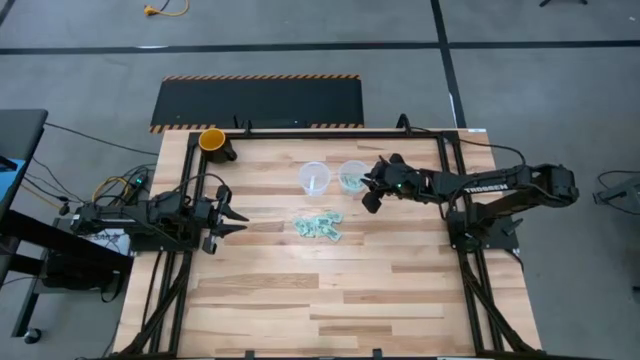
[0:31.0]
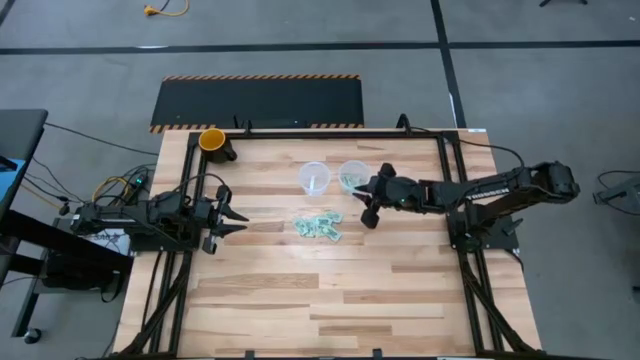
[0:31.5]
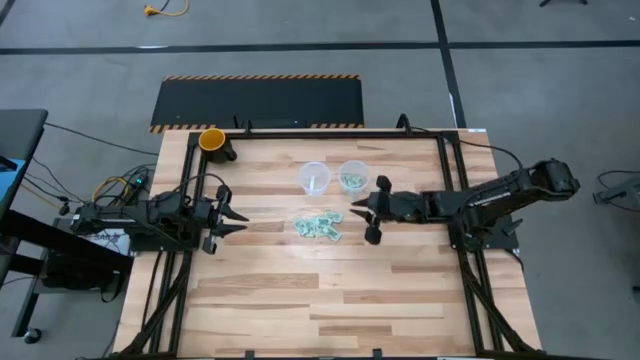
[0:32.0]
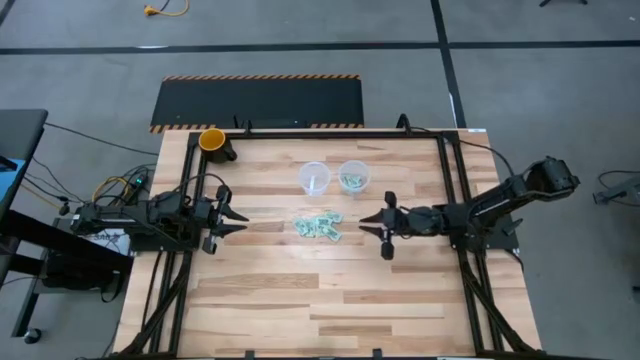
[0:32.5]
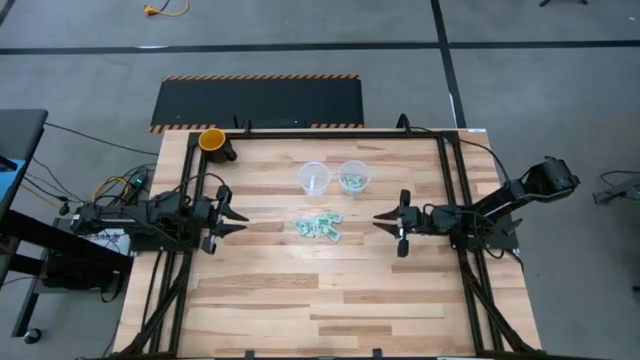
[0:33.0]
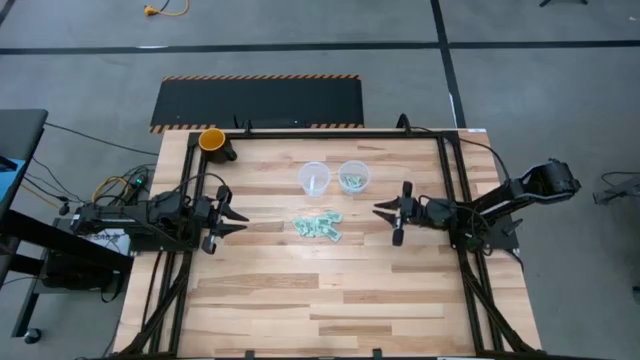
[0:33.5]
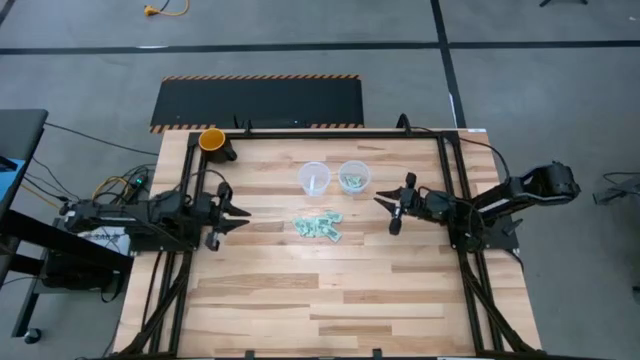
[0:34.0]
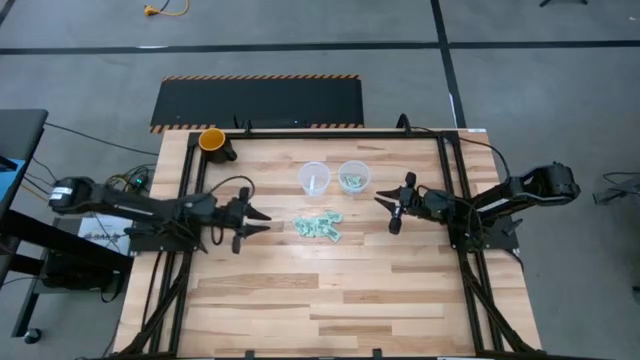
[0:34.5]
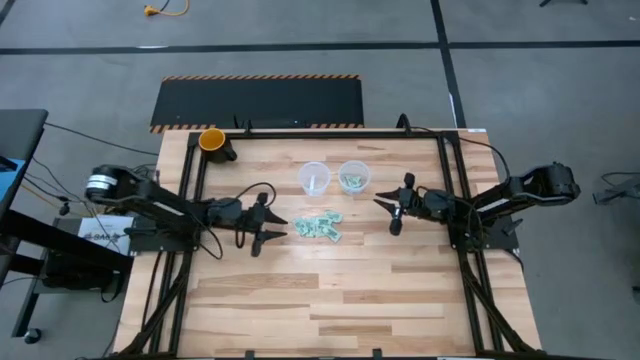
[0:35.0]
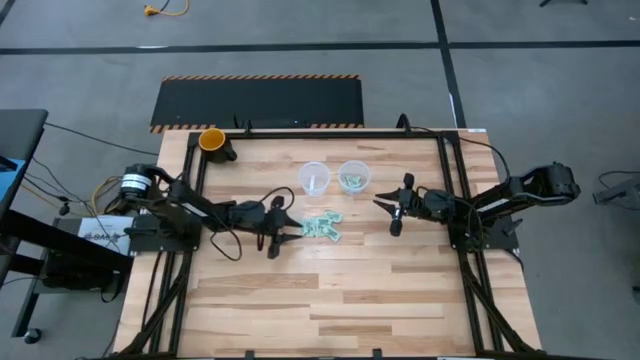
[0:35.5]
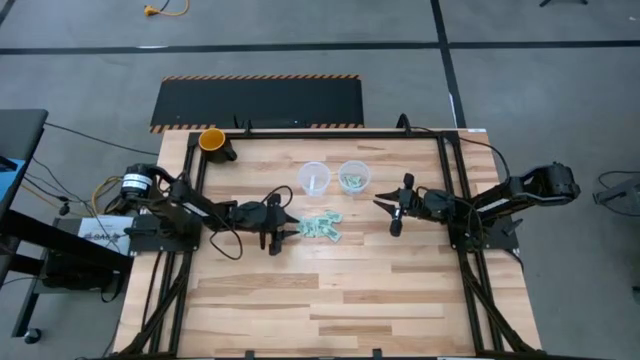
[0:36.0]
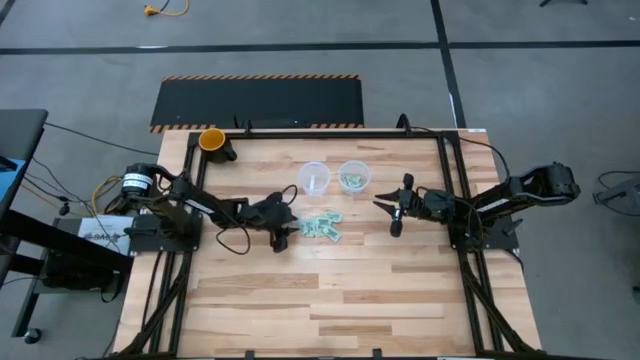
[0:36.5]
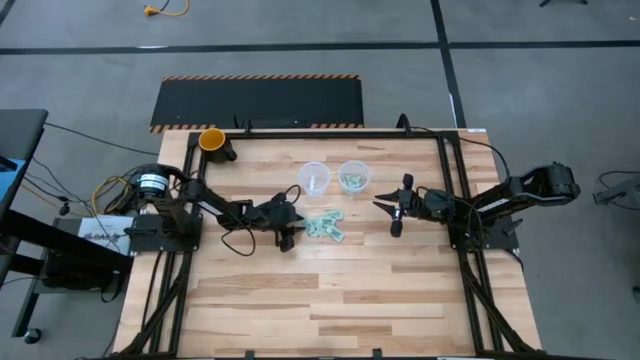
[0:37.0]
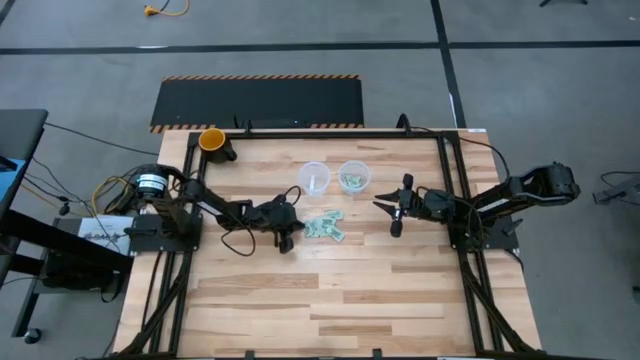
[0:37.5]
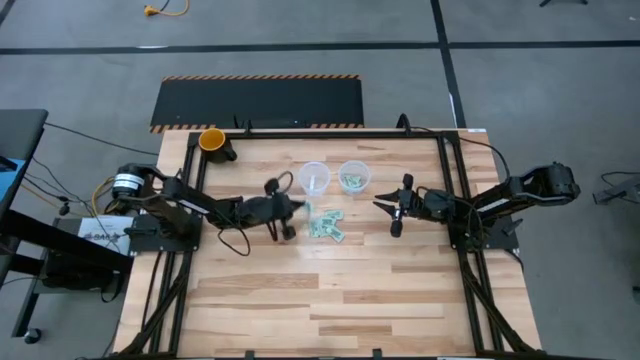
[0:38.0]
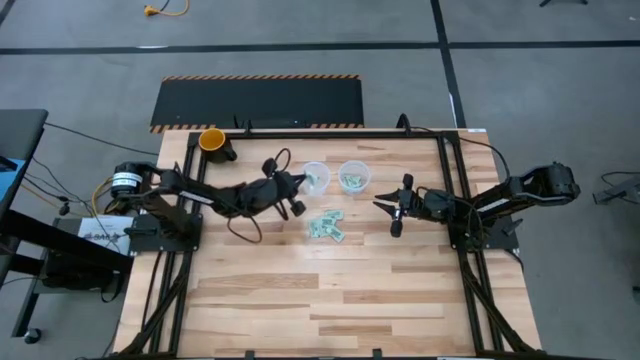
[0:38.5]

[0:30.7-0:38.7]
Task: Pick and place items into bin
Put the green stevia packet into the left transparent bin

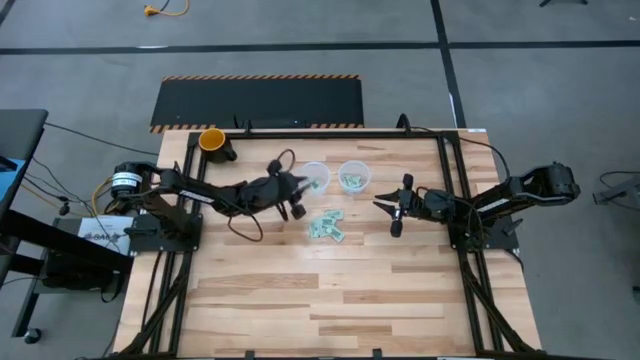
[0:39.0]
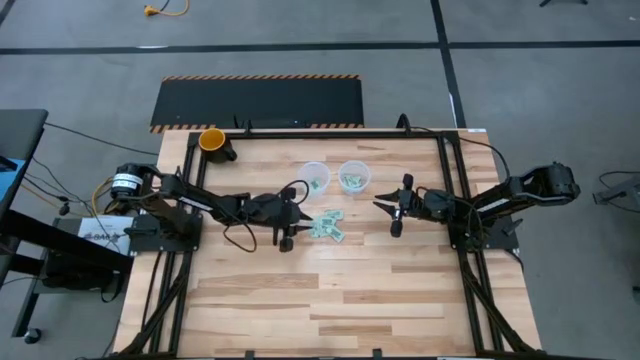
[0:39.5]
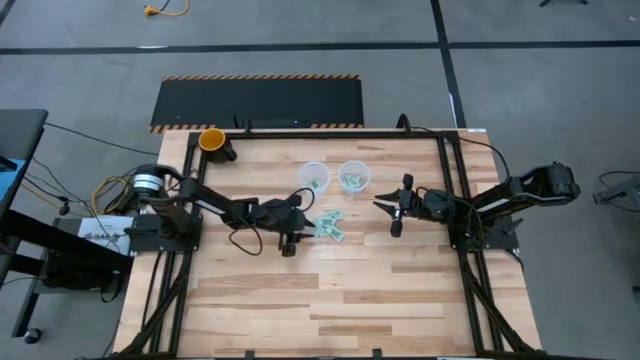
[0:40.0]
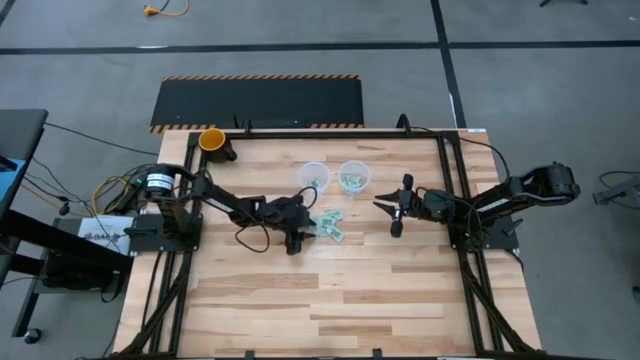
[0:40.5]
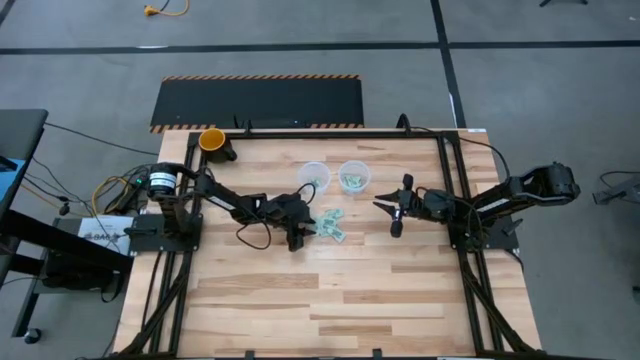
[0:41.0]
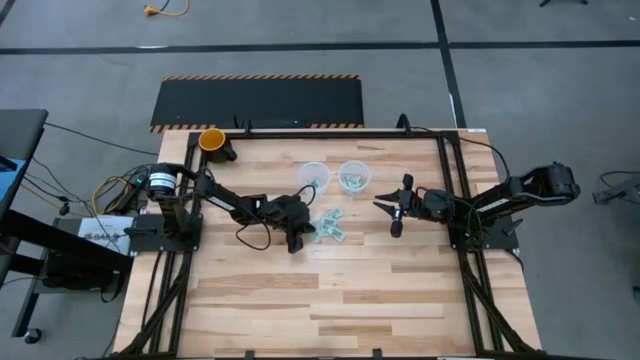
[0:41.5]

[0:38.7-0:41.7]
Put the green stevia packet into the left transparent bin

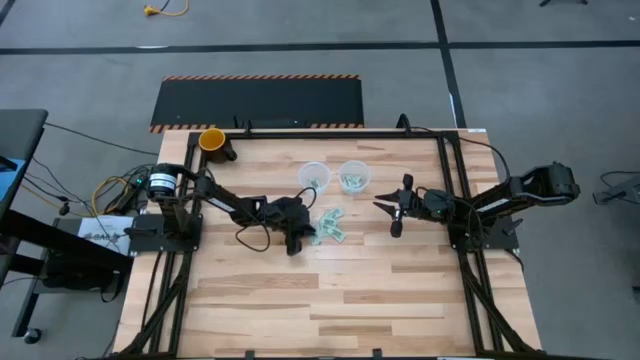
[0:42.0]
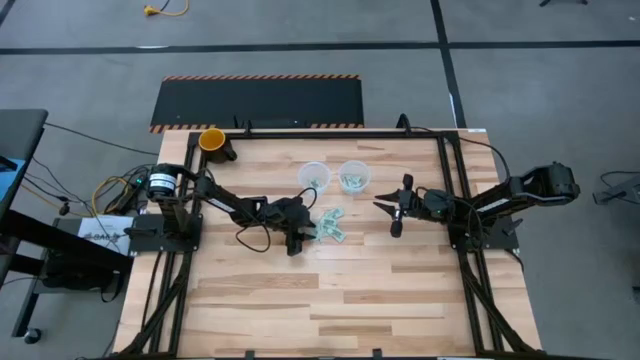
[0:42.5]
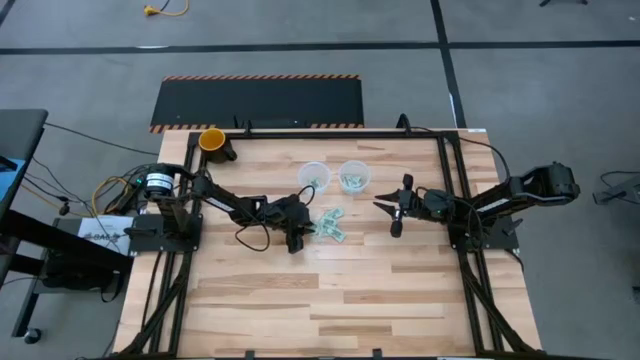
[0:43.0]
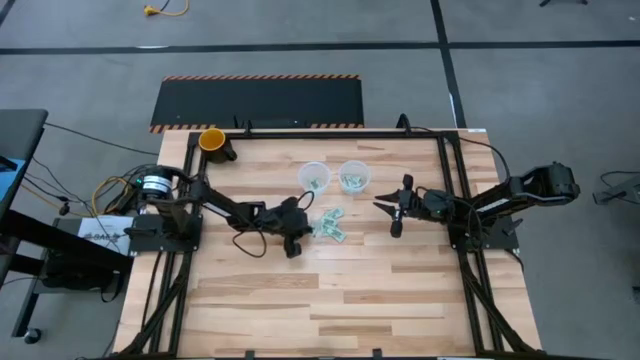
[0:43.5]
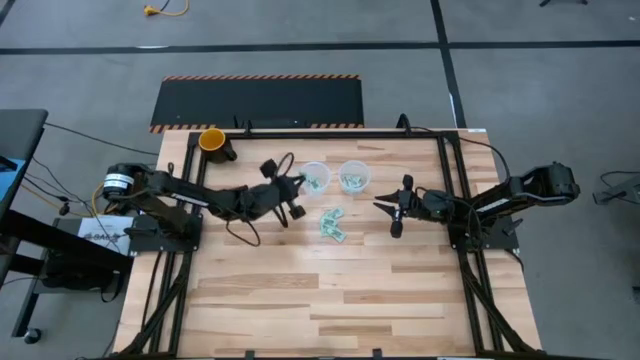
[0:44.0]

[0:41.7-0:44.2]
Put the green stevia packet into the left transparent bin

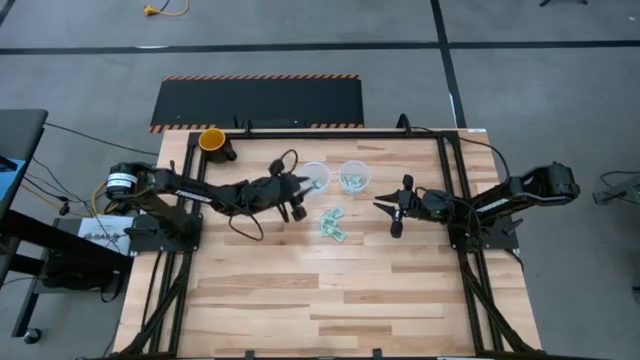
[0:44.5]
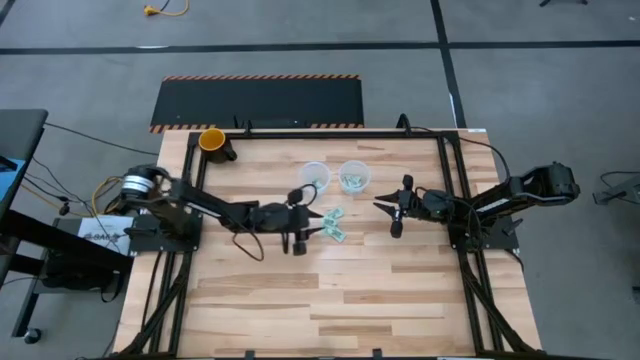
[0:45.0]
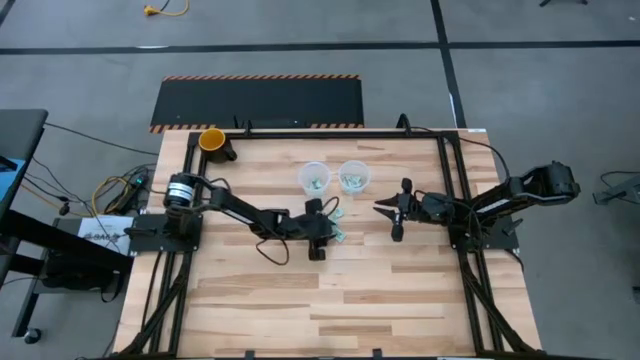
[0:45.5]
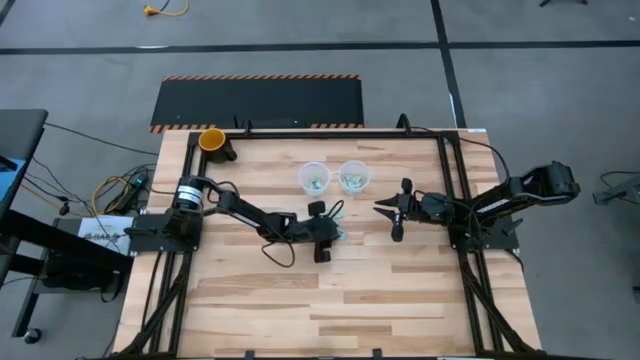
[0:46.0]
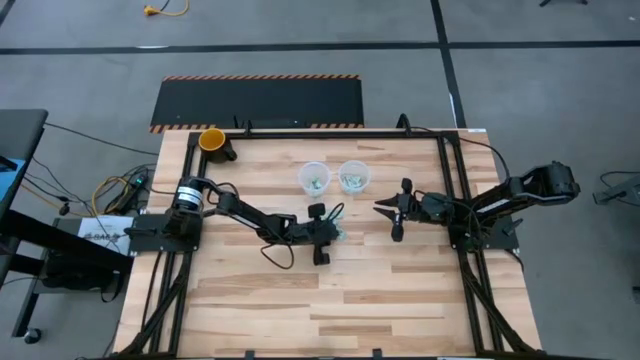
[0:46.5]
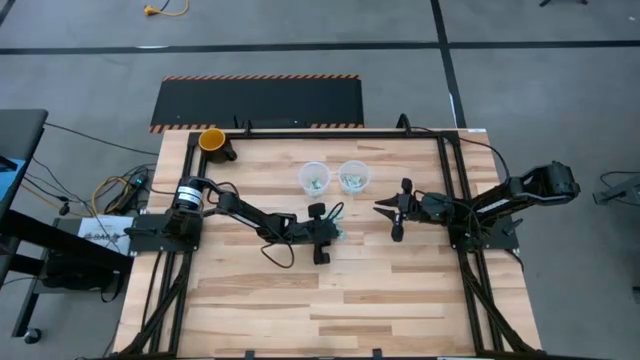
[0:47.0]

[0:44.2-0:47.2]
Put the green stevia packet into the left transparent bin

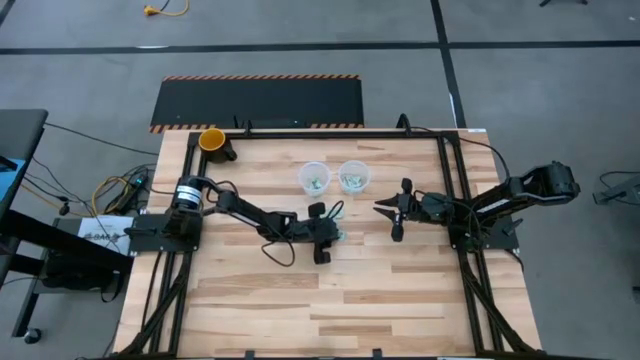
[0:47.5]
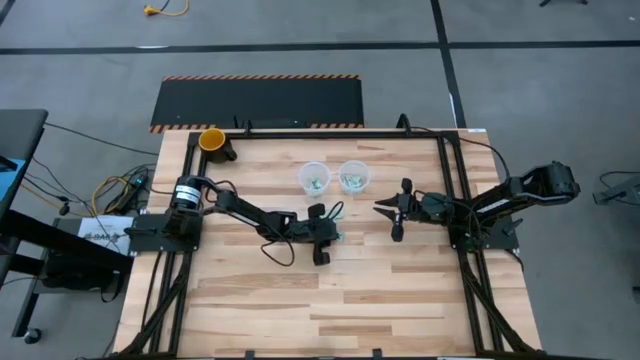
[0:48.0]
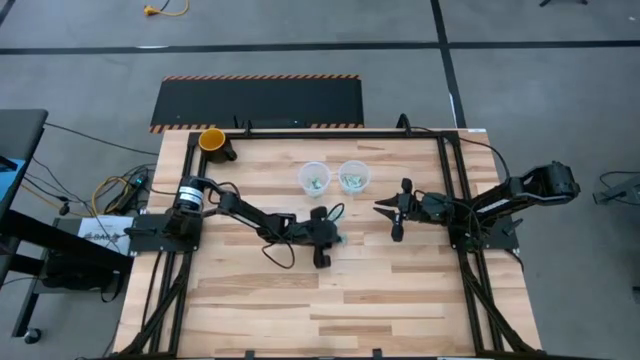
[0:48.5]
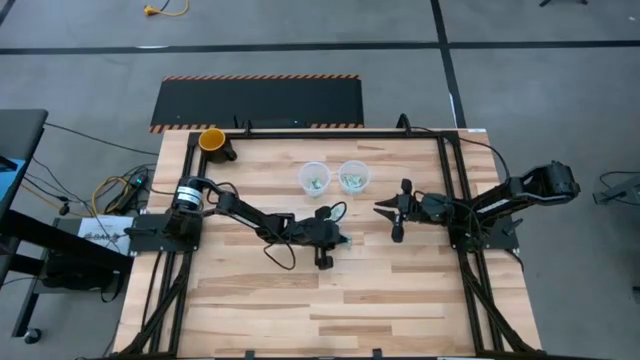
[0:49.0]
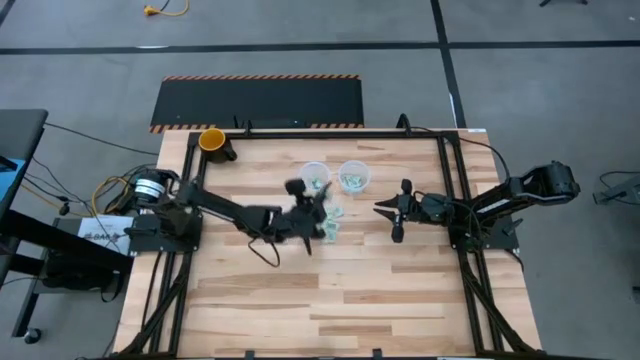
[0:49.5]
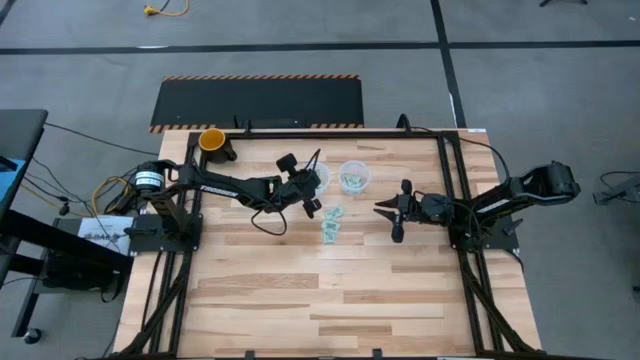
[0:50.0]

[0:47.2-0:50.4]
Put the green stevia packet into the left transparent bin

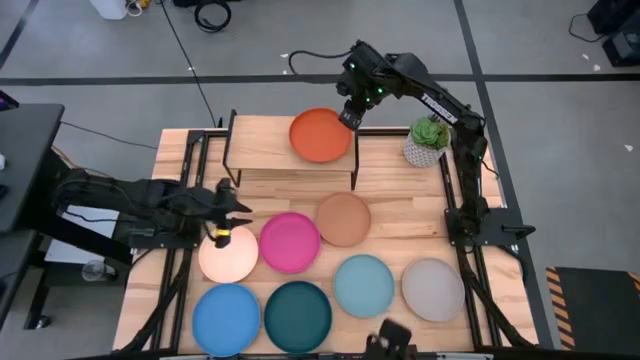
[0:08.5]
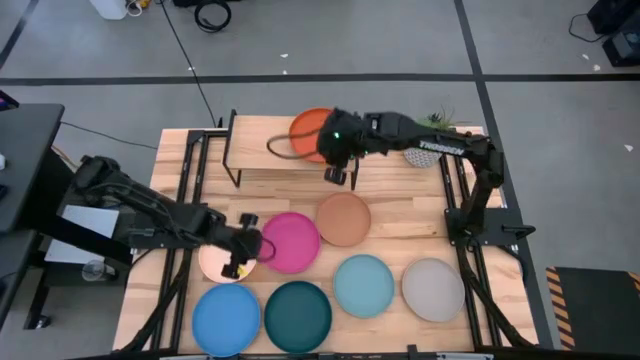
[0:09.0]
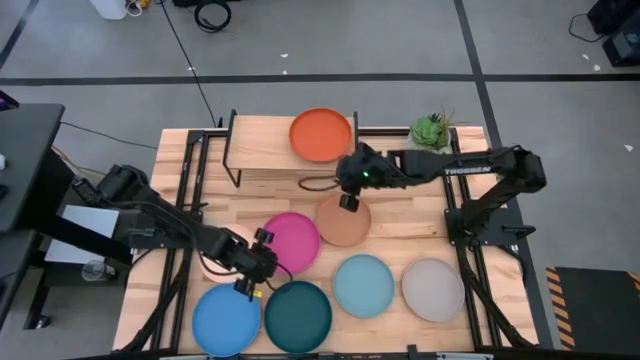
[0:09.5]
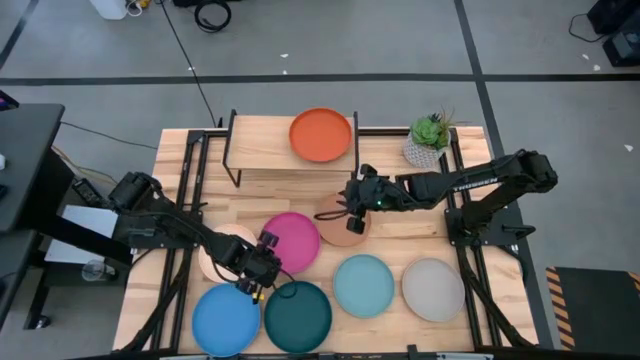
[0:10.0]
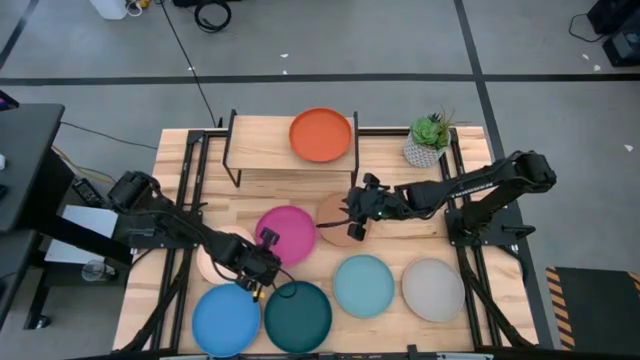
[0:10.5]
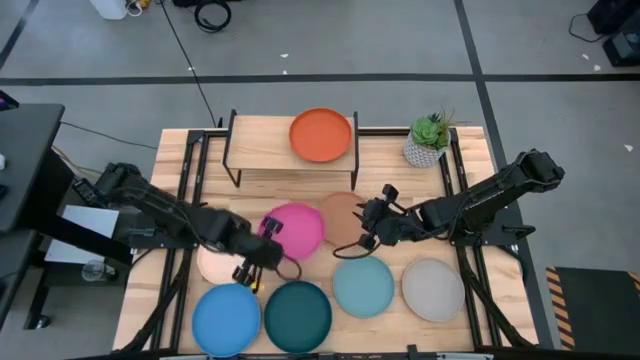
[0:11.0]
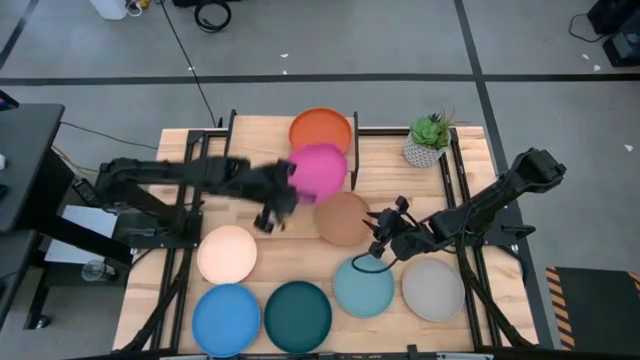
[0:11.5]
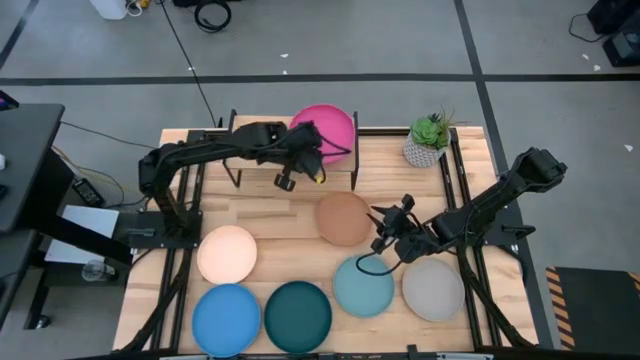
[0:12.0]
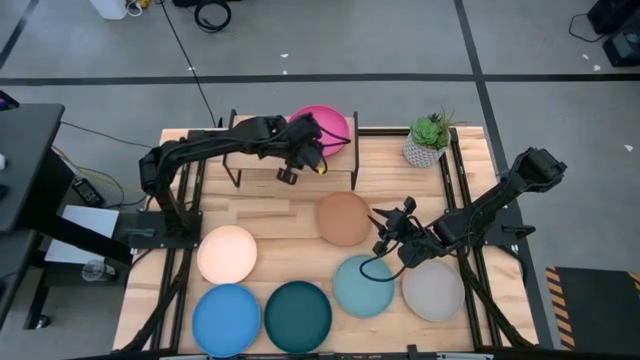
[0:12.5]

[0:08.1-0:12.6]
Task: Place and stack plates onto a shelf
Stack the pink plate on top of the dark orange plate on the shelf
